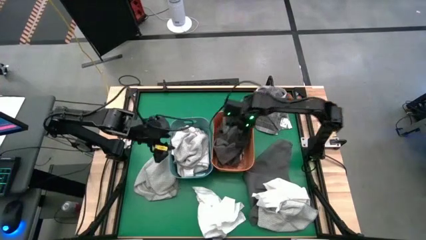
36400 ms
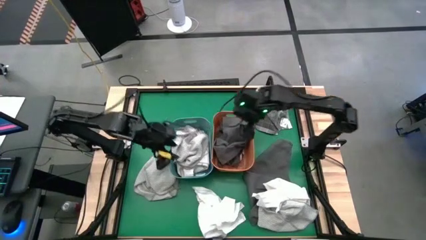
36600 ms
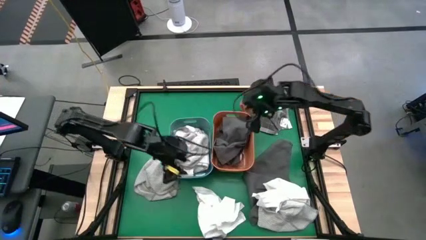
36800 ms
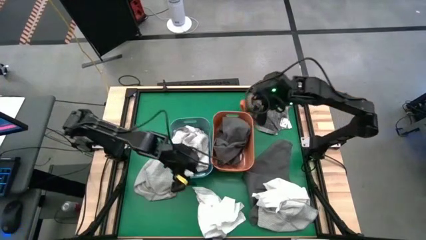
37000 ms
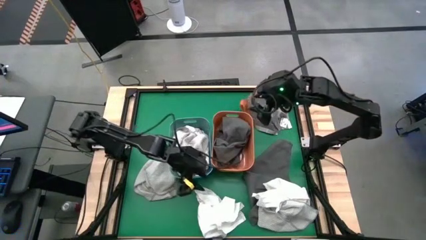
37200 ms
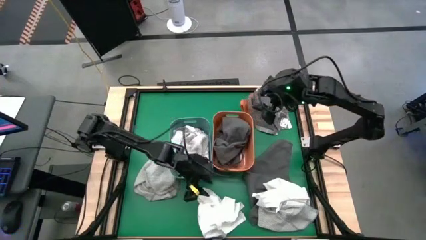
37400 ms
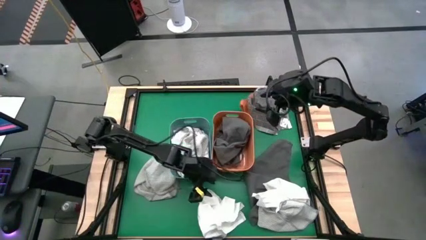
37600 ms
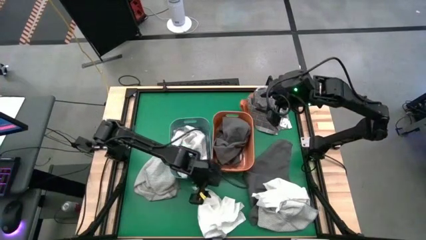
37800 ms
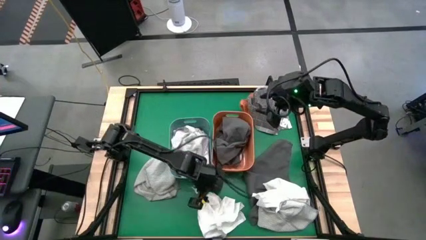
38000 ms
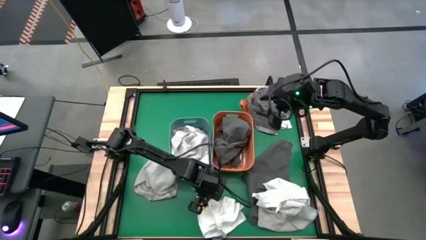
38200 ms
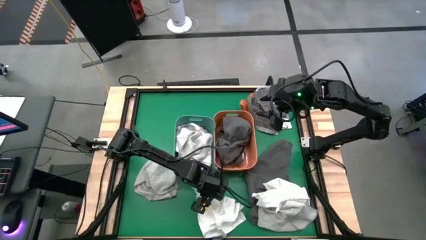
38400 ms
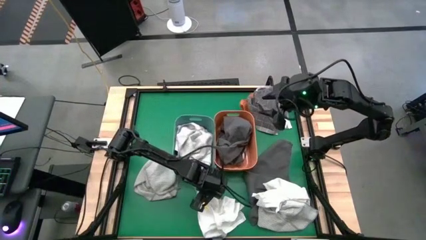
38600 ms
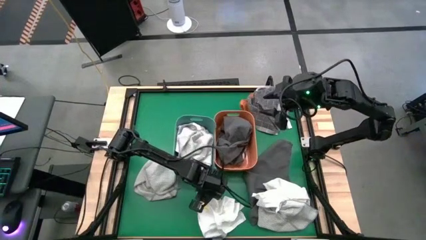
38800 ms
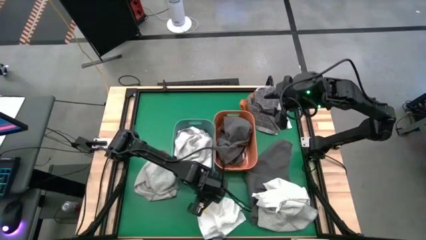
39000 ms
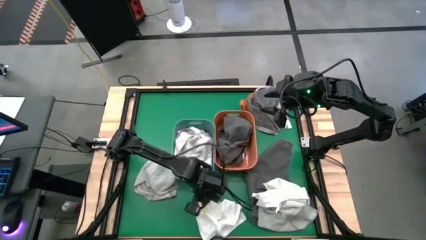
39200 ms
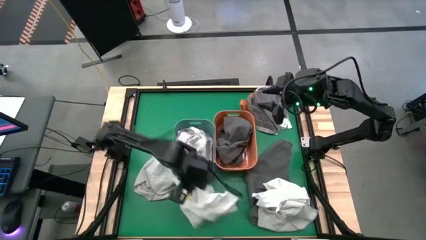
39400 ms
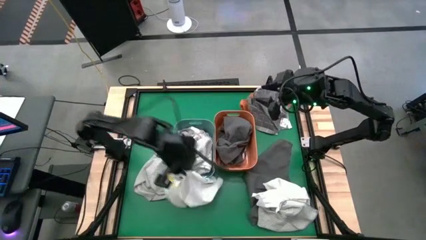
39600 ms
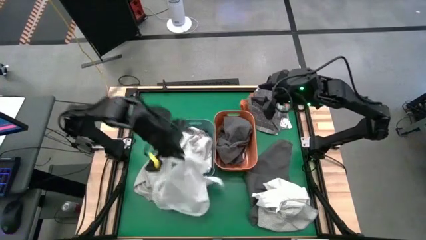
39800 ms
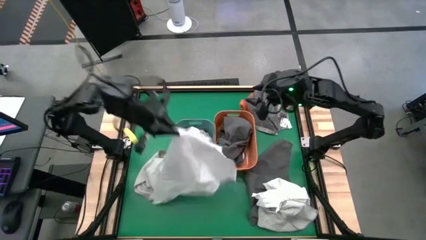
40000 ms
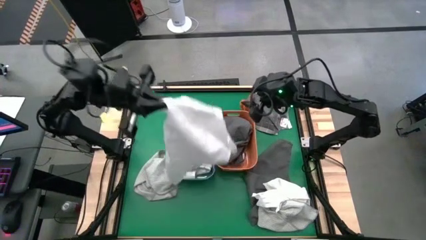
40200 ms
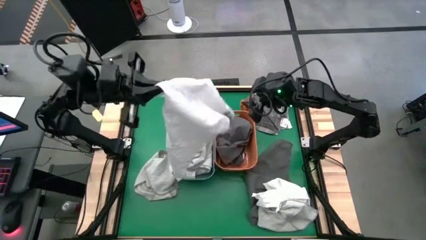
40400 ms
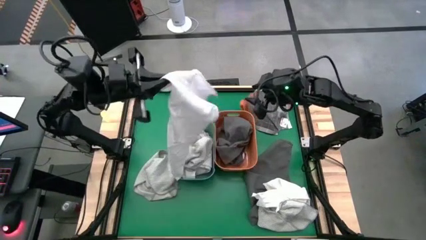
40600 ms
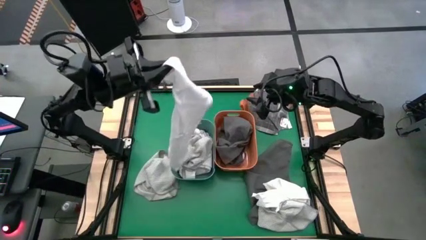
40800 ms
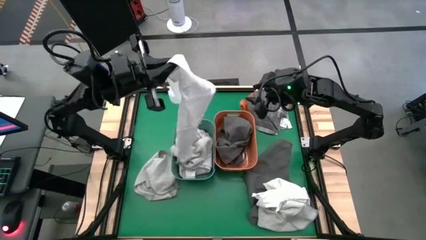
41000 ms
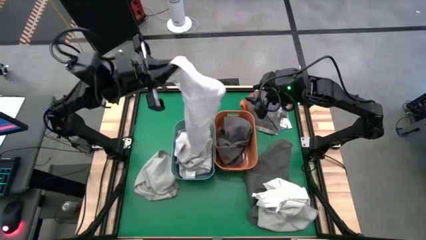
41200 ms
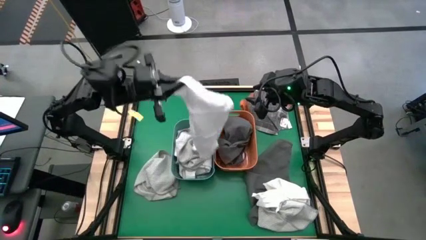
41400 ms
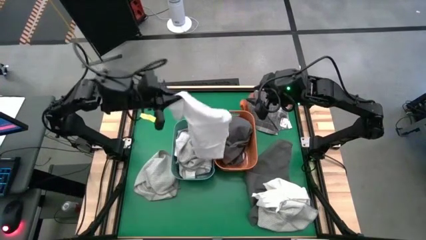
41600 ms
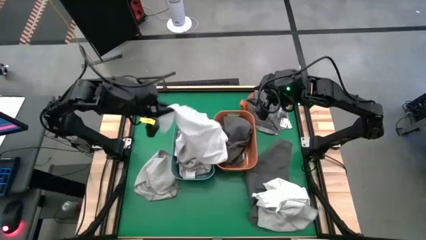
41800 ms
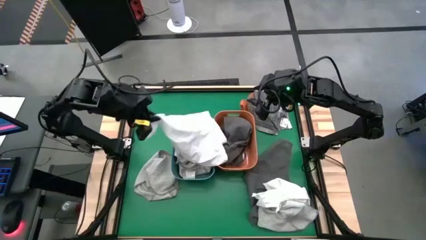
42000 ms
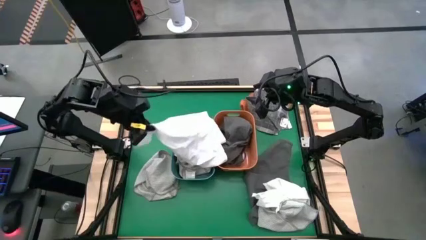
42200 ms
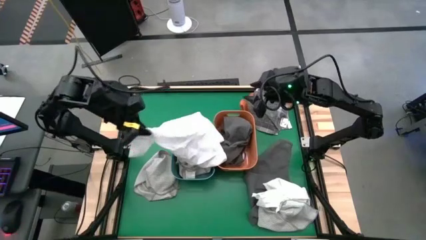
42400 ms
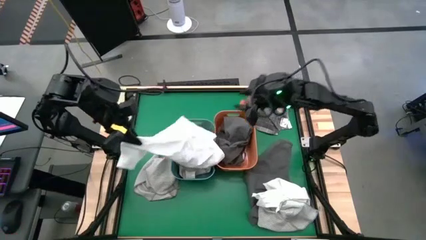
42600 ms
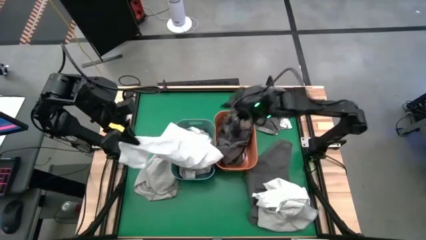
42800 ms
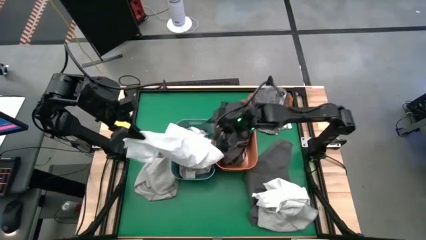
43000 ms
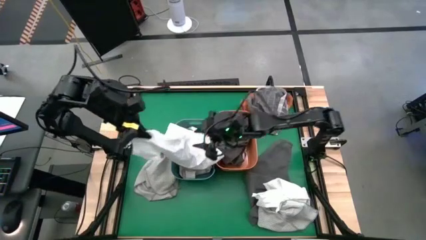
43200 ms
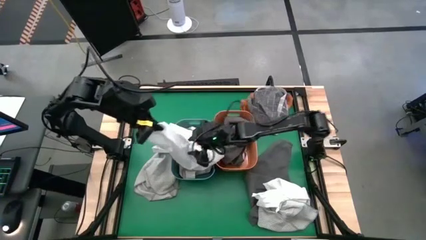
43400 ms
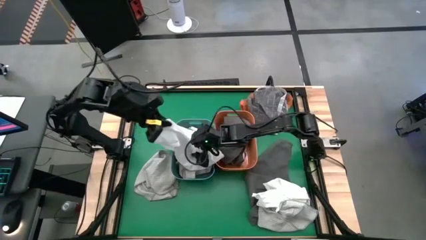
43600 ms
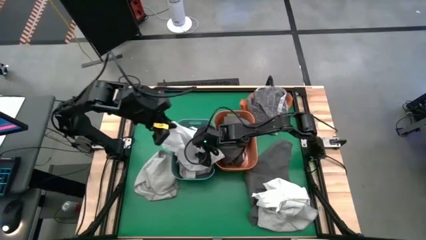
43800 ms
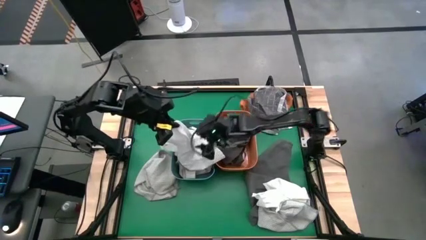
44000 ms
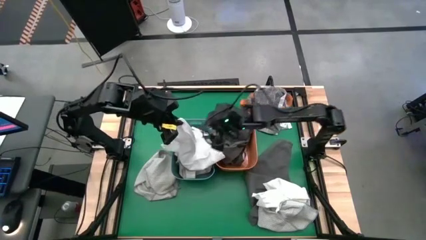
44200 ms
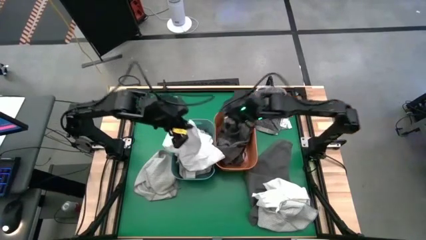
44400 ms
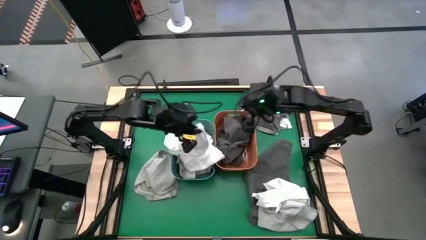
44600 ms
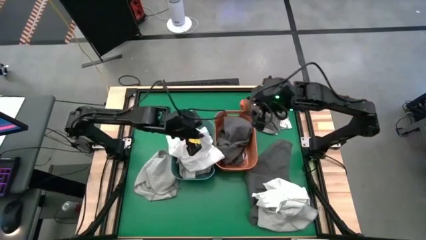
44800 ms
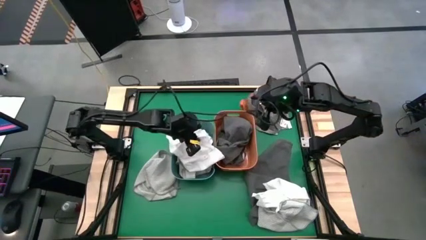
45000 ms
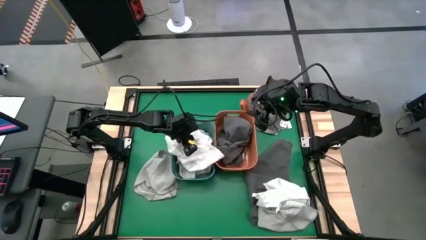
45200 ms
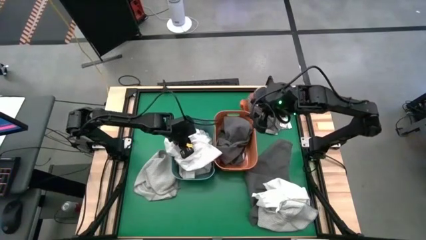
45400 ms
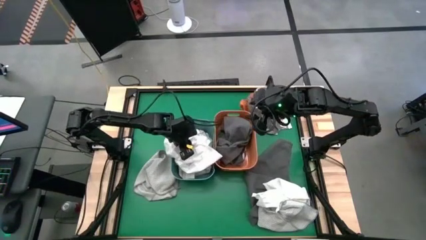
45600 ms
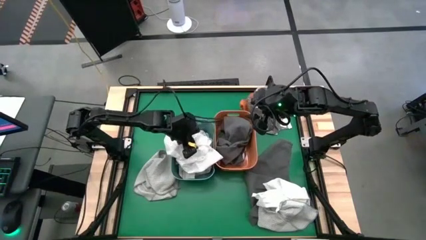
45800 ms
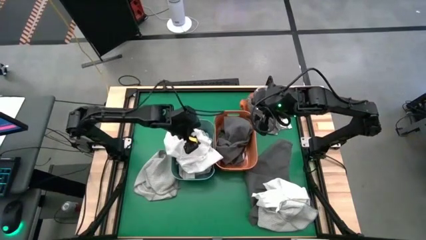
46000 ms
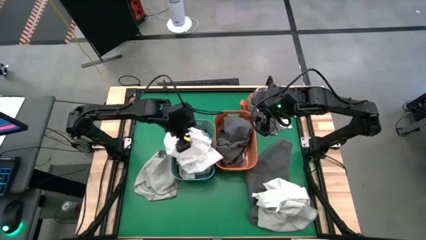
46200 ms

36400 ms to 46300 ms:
Task: Sort towels by color in basket
Put the white towel into the green bin

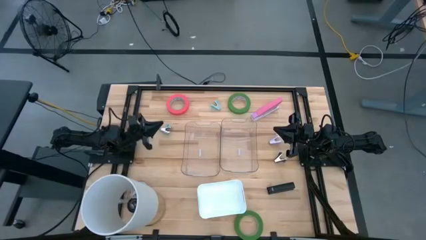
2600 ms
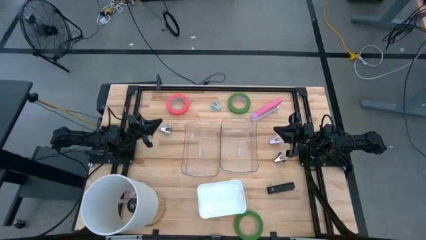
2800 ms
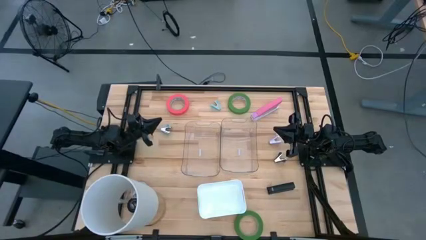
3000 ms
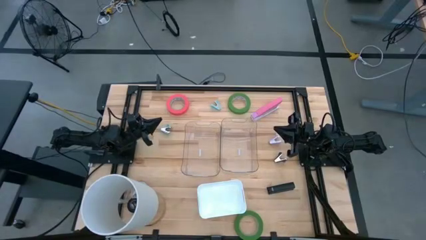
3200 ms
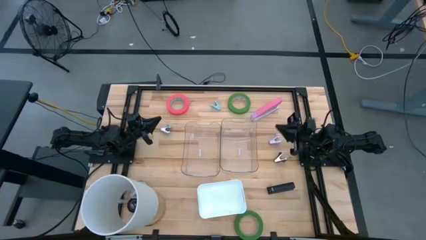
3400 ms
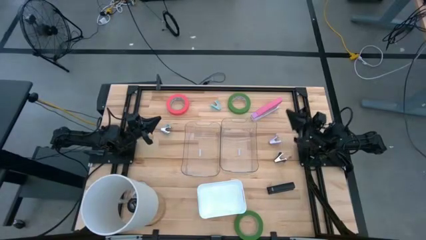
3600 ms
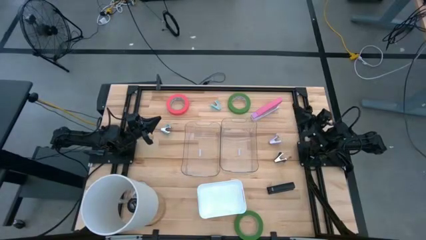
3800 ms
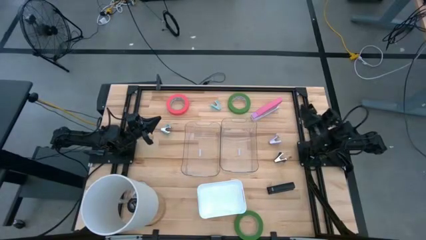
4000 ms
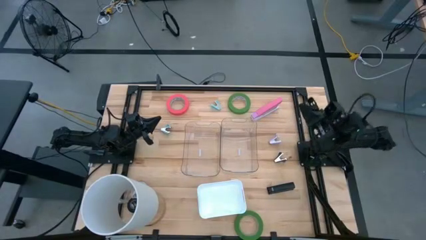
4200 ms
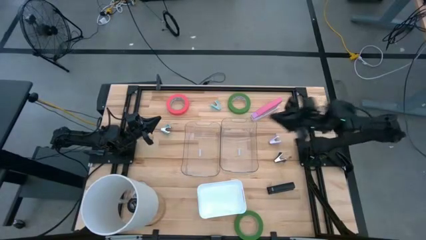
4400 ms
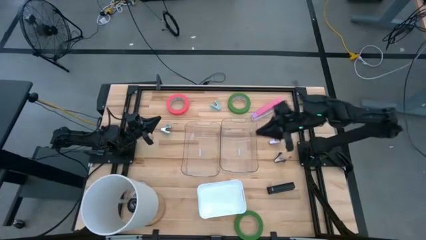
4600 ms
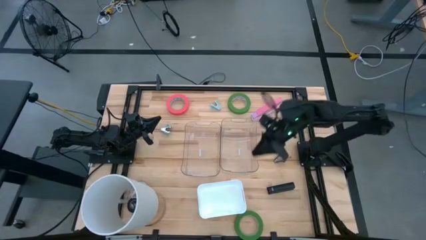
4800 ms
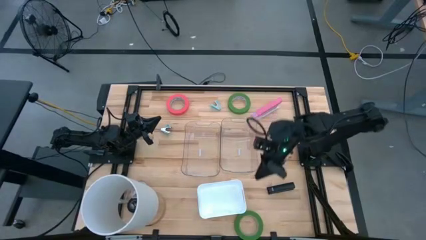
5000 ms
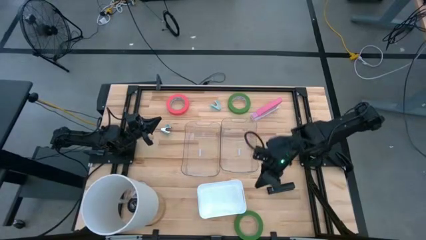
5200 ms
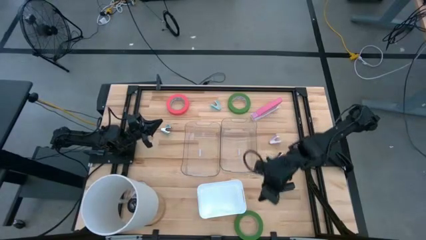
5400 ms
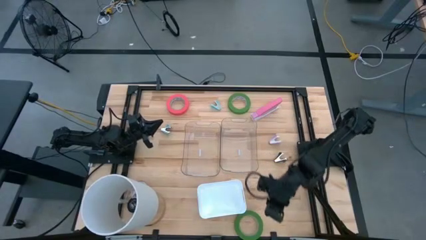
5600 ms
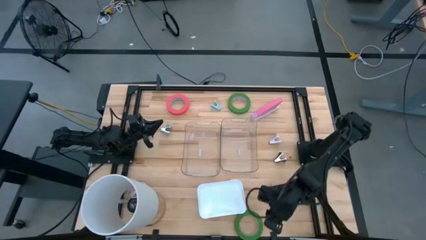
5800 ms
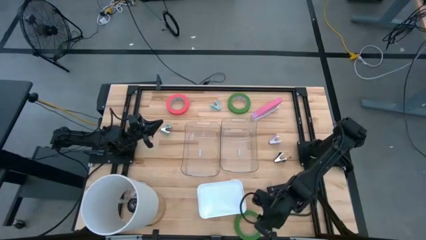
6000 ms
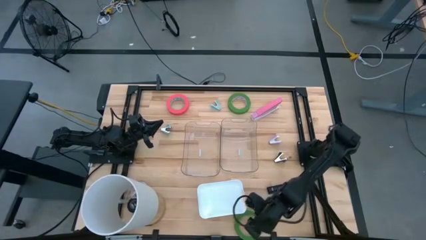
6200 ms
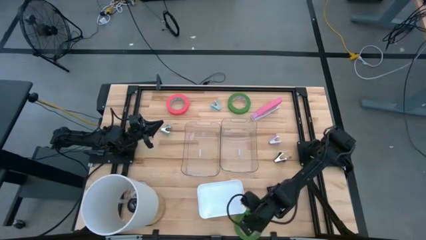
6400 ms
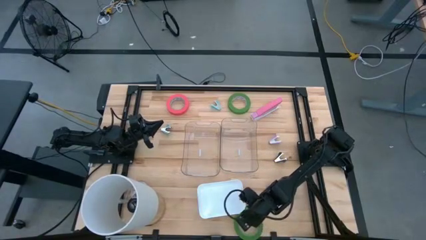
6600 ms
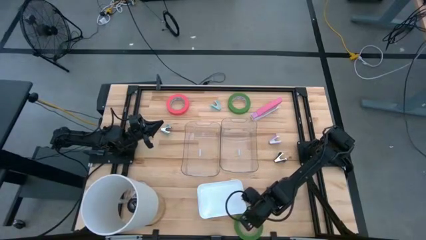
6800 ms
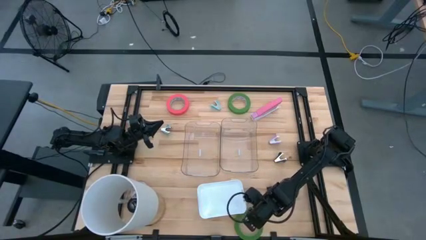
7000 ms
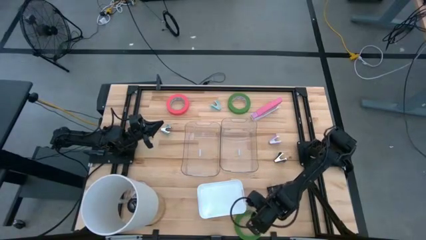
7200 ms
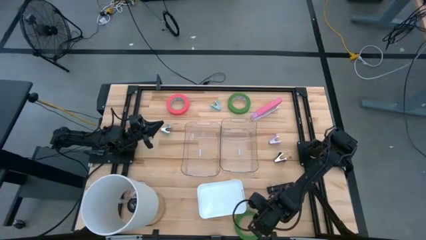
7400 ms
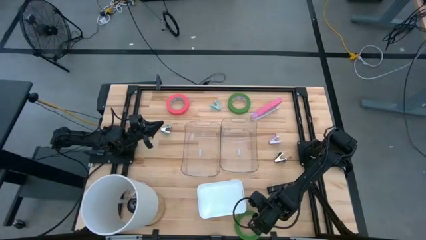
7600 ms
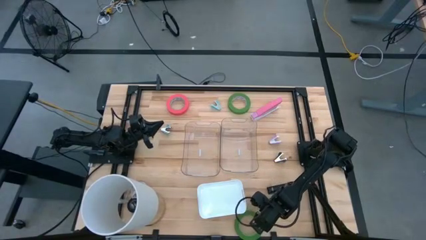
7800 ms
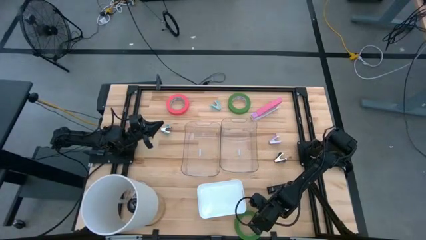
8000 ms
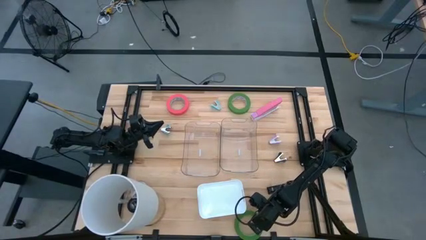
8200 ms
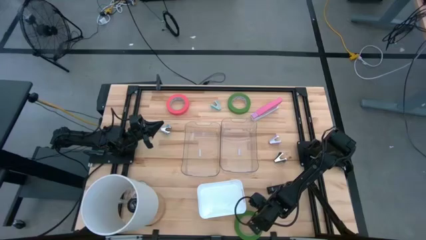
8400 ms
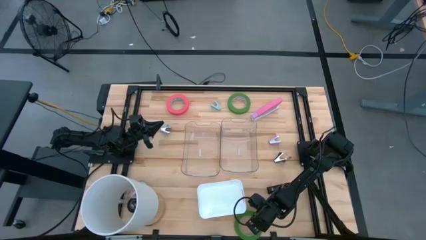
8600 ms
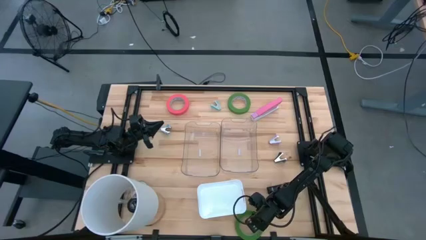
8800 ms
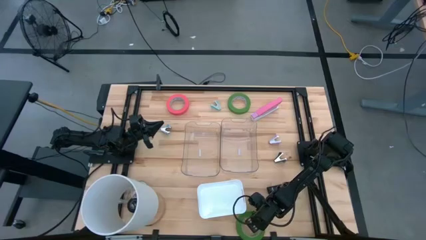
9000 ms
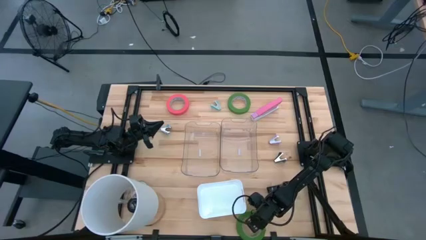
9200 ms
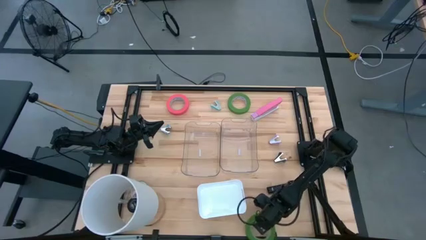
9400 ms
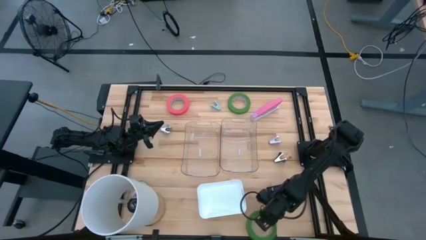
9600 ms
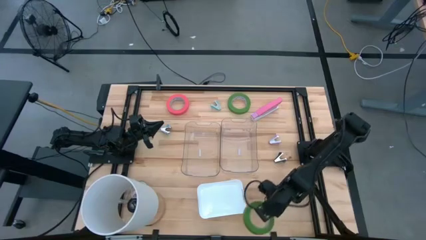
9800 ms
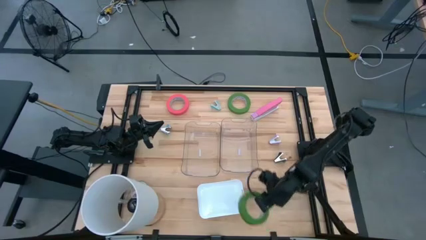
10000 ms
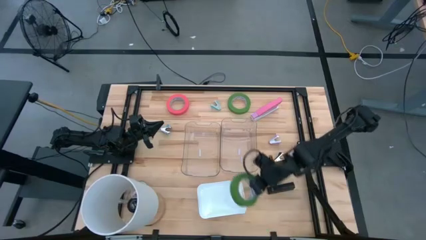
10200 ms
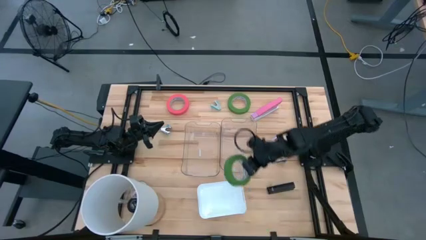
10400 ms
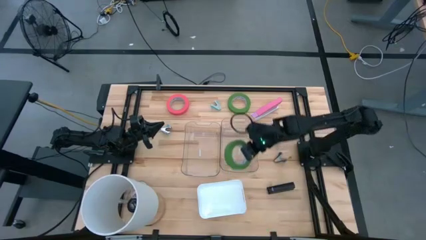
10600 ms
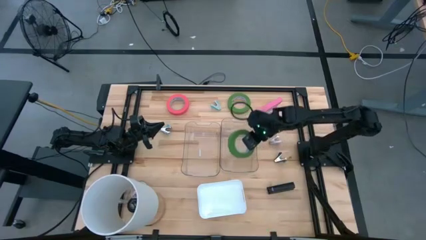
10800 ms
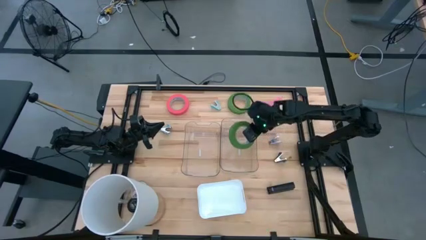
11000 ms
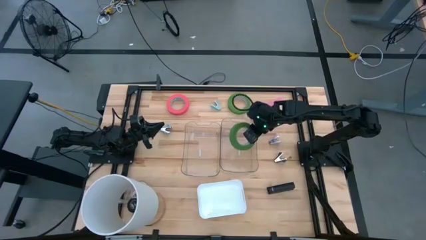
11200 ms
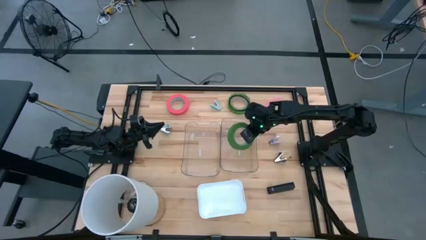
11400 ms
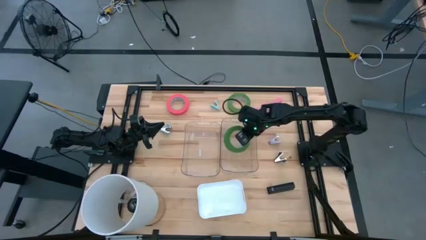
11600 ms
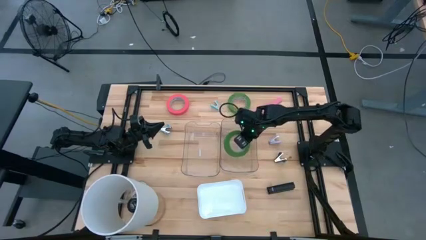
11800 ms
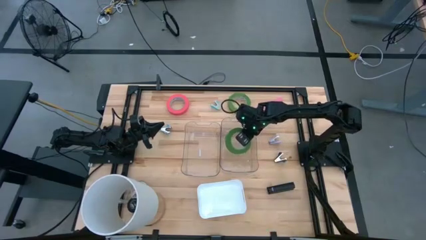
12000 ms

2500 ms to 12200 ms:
Task: Pick and place Stapler, Stapler remover, tape
Put the bottom green tape into the right transparent bin
